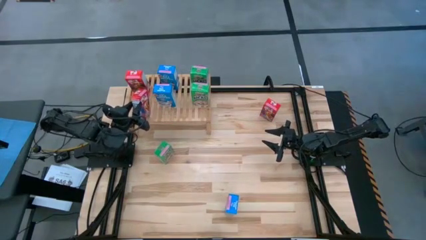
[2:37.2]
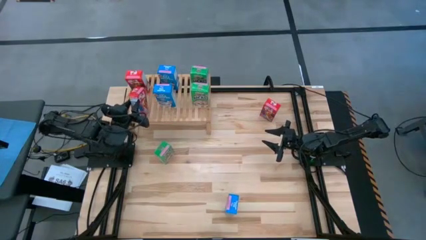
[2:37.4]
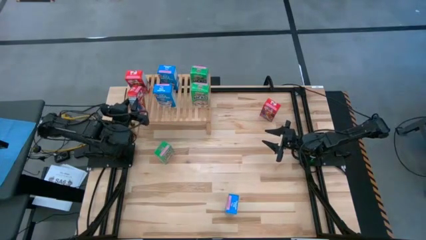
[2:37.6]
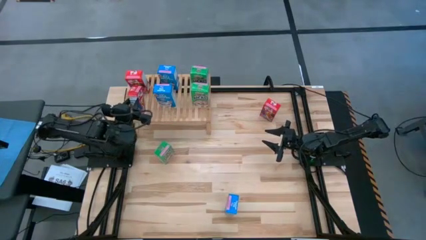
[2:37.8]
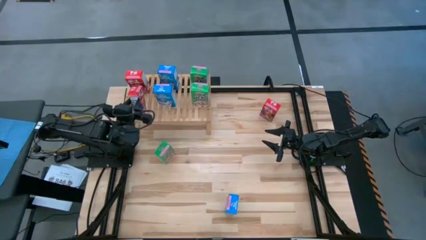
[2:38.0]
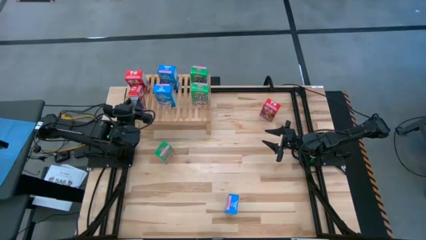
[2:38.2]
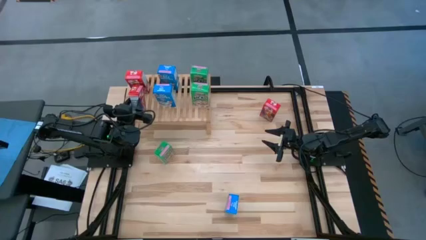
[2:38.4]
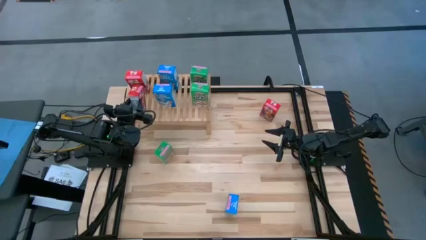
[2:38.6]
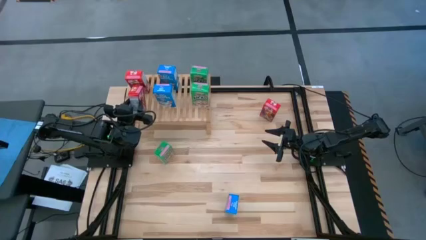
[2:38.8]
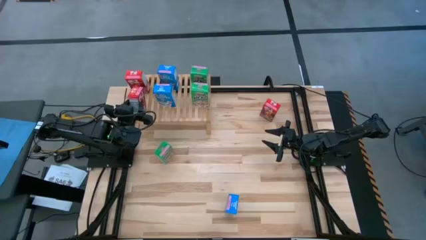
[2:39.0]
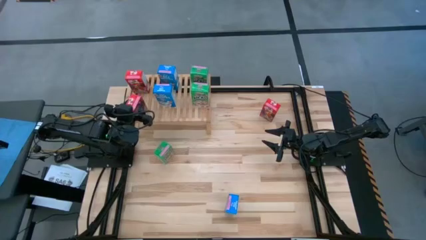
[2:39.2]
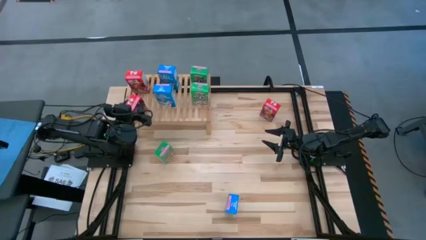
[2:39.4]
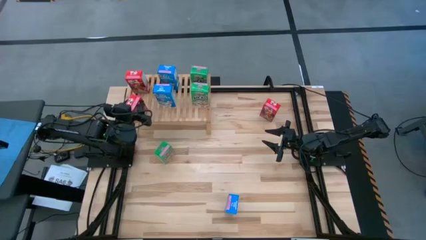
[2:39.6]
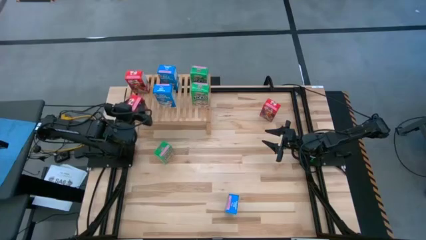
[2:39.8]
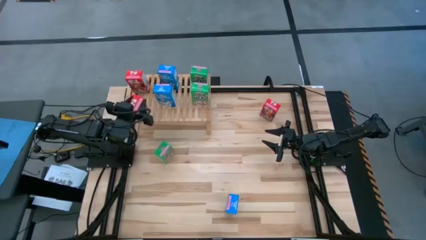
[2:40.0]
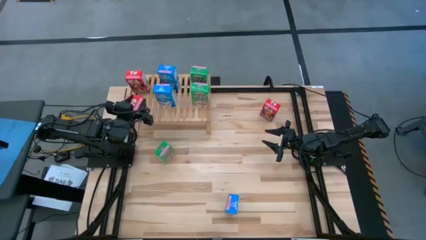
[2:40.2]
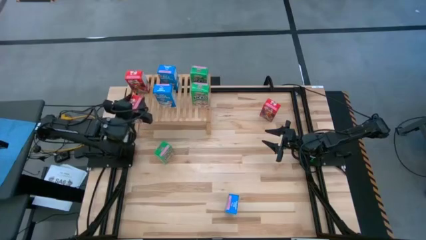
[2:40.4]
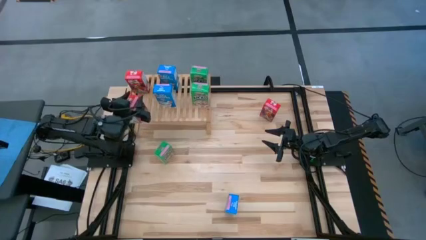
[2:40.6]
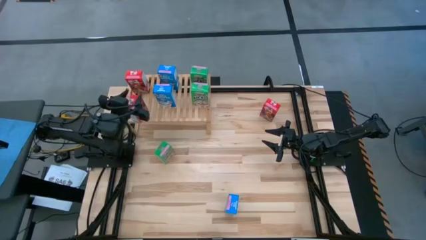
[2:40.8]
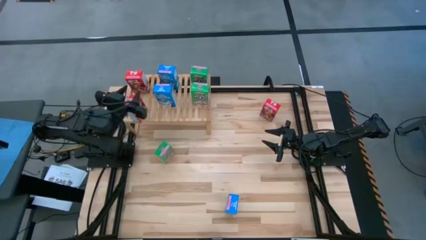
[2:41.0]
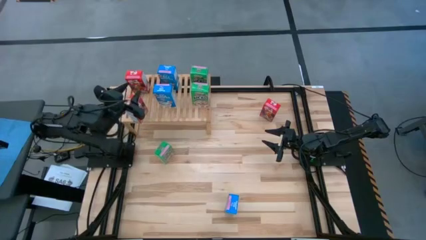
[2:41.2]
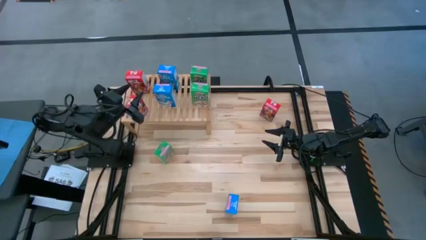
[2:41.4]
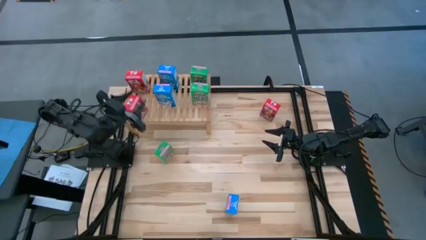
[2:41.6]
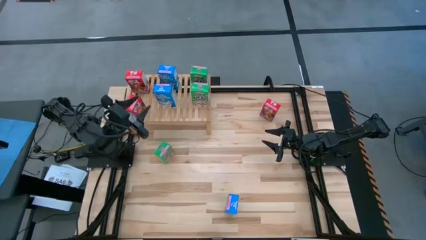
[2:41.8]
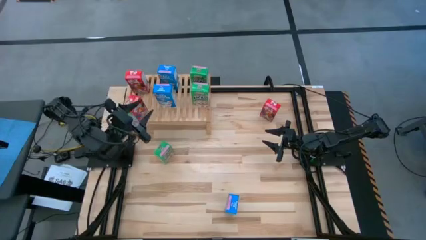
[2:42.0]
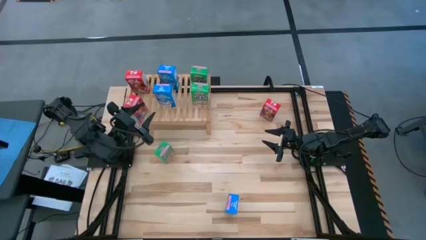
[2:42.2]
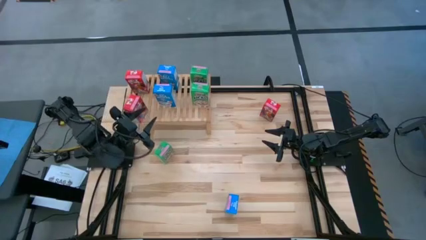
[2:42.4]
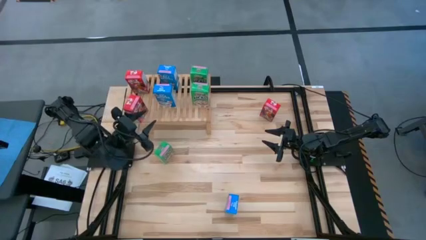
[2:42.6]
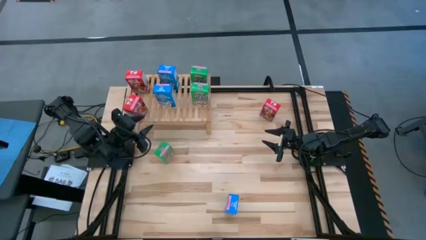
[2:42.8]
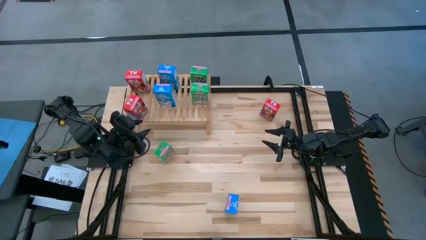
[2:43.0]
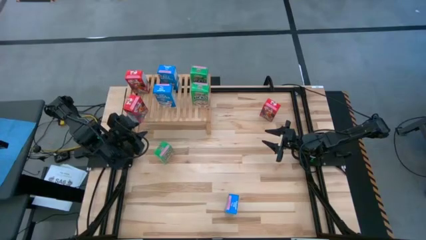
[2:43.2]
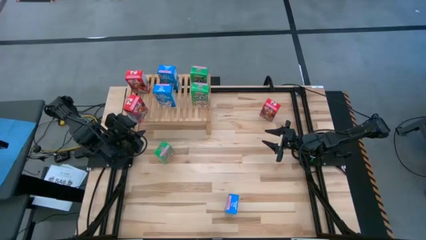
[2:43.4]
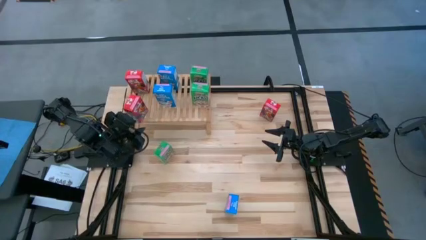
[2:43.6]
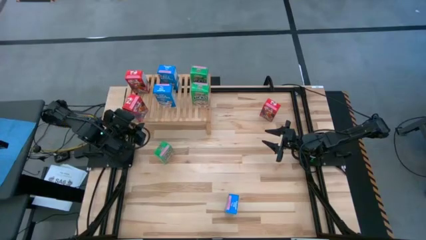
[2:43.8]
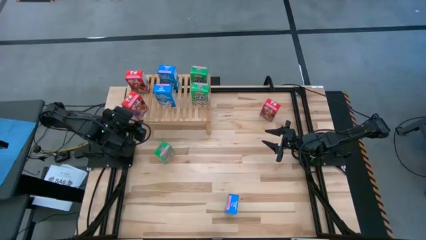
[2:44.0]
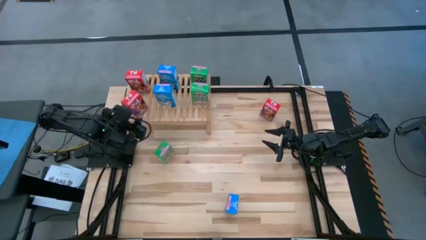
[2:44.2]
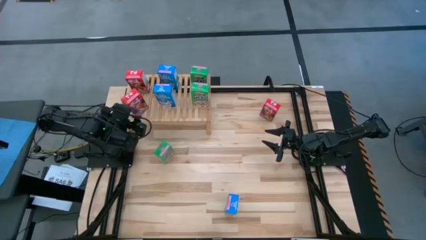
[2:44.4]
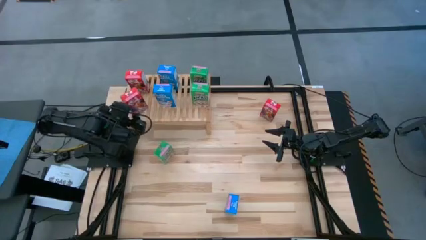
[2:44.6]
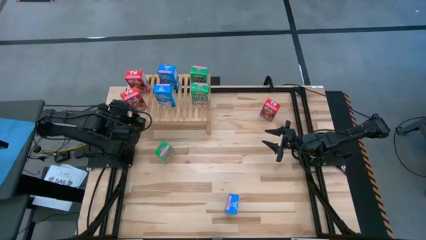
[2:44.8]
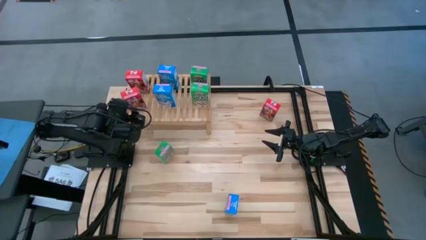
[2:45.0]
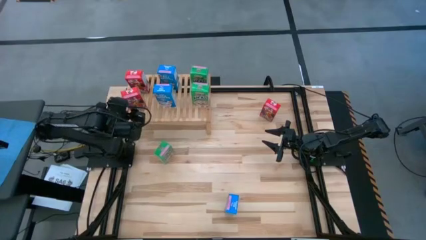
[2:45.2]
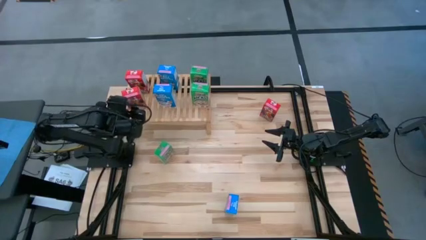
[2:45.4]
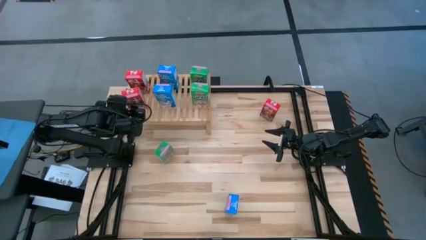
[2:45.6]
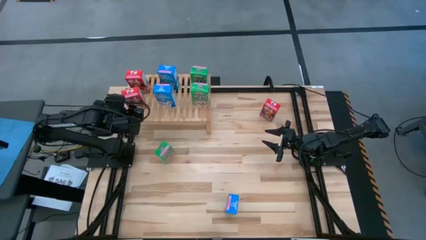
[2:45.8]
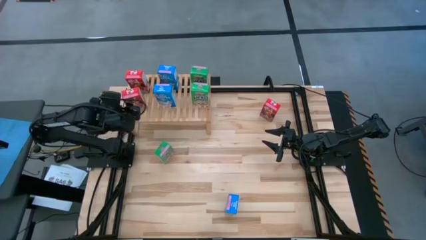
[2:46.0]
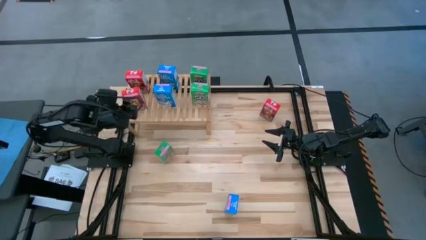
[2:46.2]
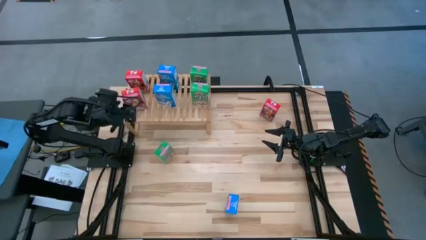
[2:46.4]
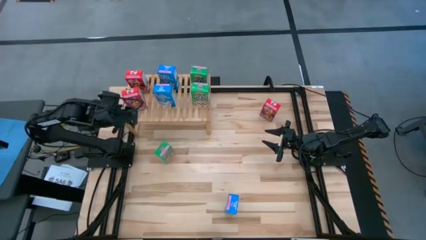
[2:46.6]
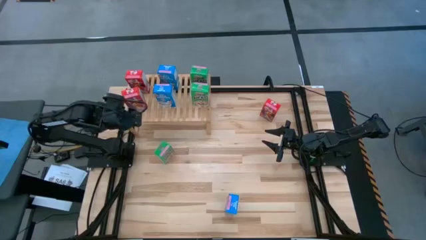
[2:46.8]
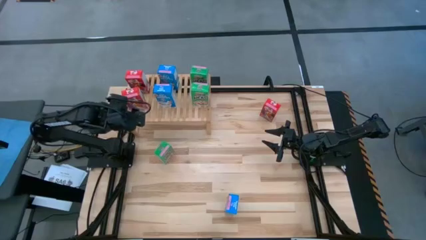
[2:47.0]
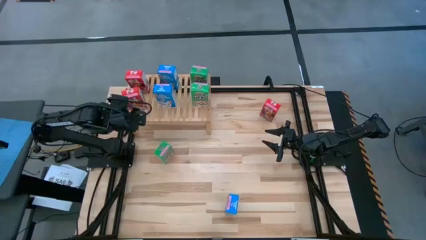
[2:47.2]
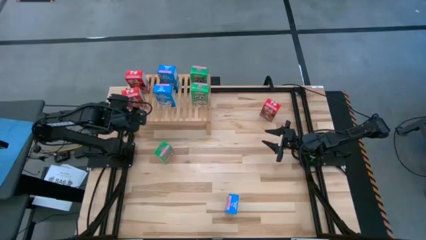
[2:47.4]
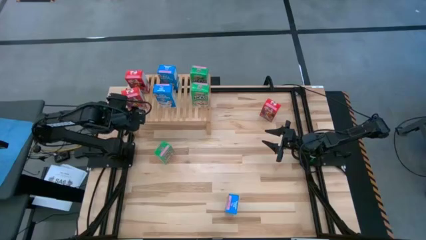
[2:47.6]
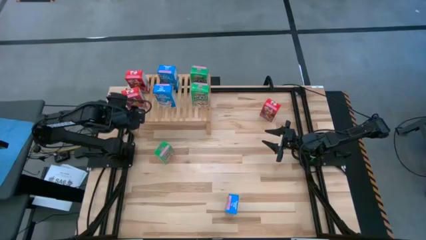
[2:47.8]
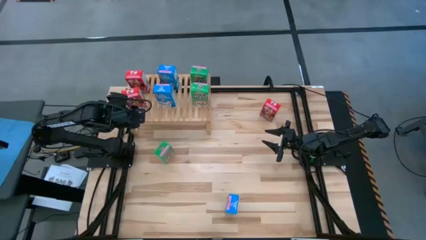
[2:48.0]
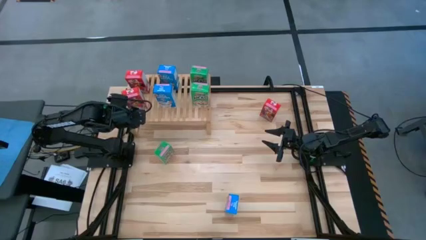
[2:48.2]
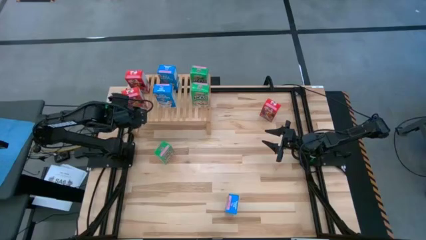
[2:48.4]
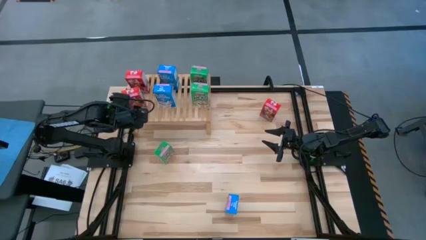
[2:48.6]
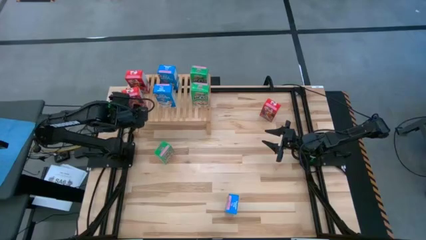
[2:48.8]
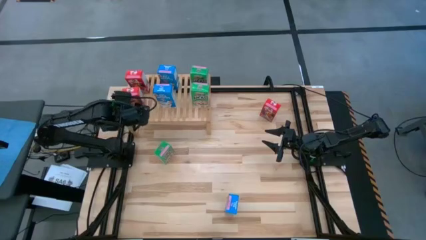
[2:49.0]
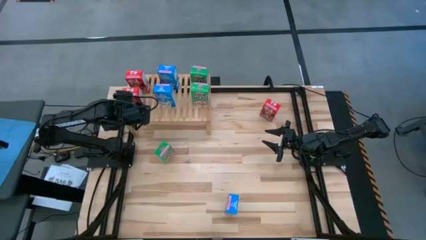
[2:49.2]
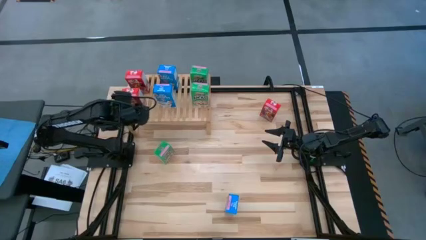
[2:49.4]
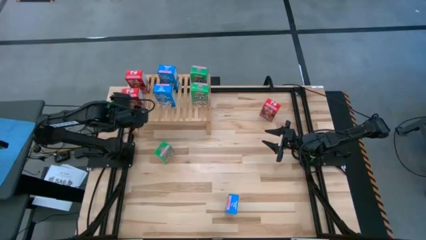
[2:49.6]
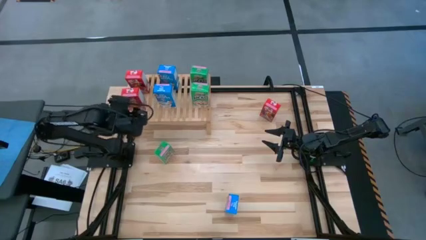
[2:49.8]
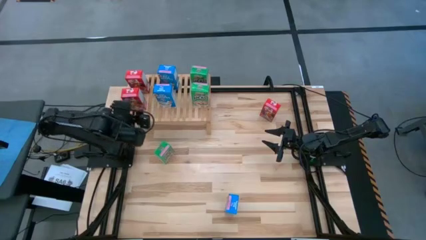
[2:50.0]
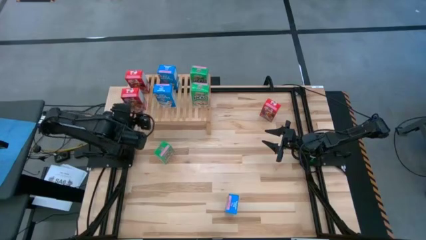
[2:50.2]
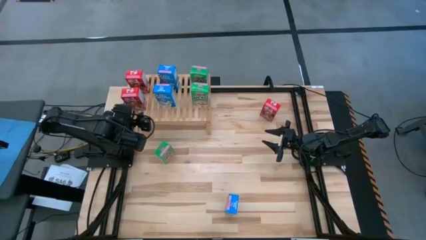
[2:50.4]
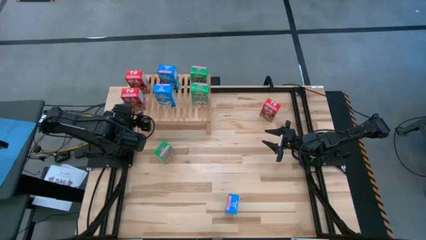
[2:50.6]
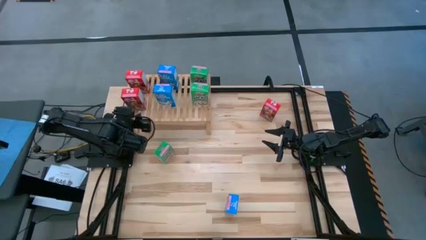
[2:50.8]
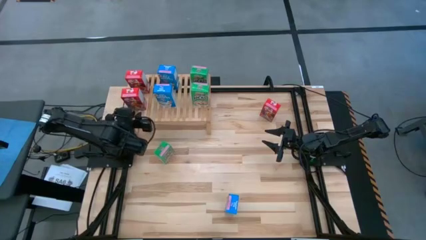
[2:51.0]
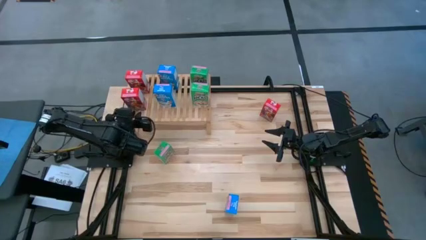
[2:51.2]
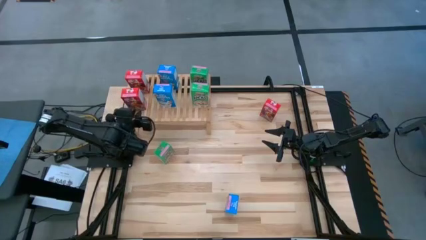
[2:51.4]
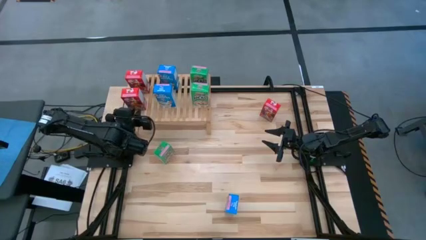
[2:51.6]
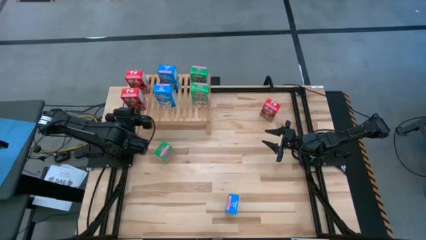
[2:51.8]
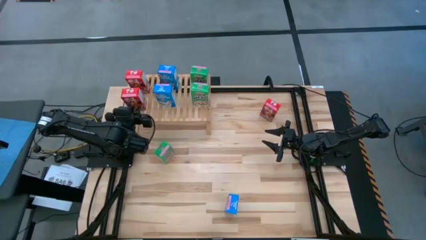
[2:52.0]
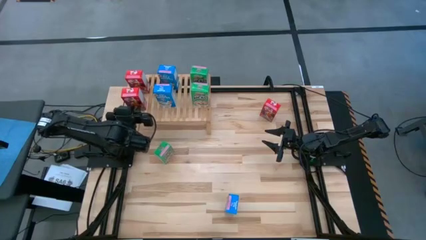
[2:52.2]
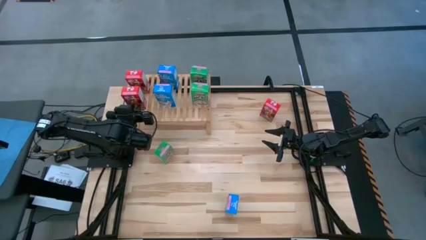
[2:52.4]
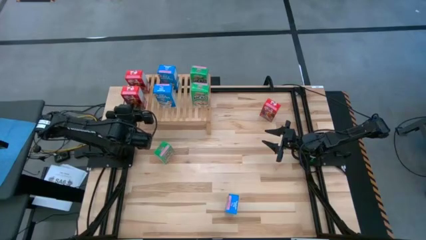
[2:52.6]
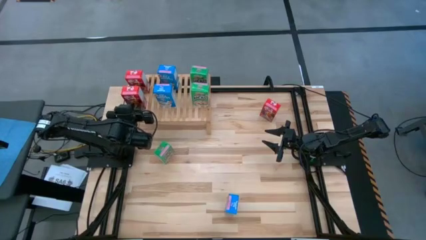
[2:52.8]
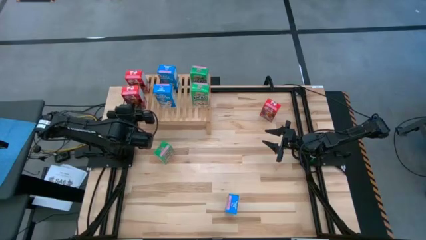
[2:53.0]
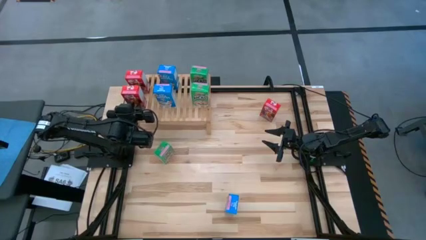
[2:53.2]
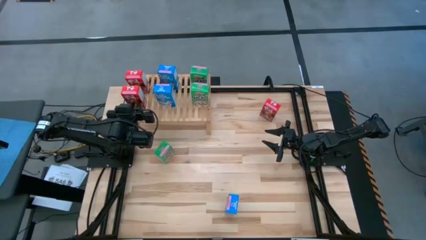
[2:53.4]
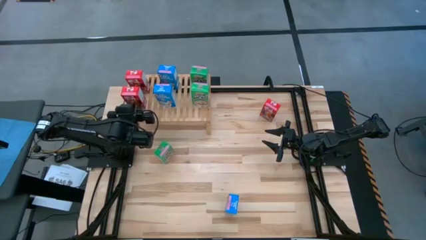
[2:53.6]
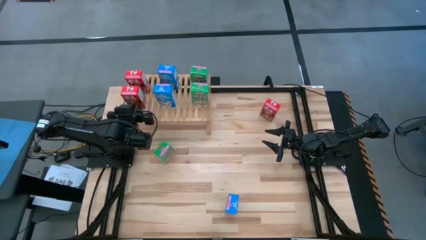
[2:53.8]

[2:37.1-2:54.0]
Task: Stack cereal on shelf
Put the bottom red cereal box on the shelf aligned with the red cereal box
